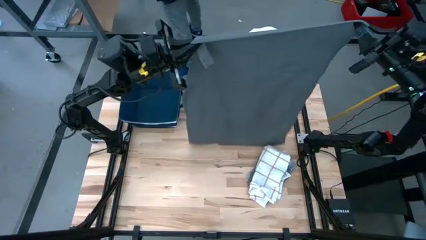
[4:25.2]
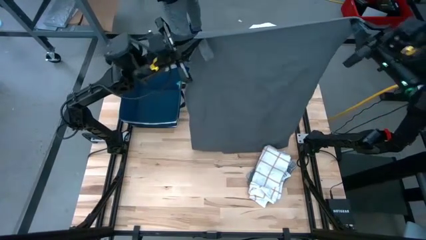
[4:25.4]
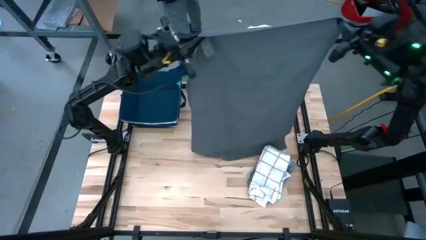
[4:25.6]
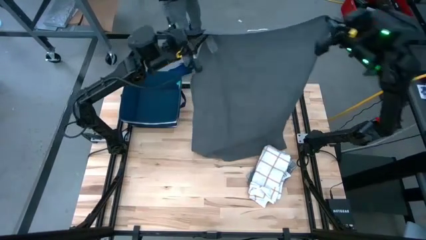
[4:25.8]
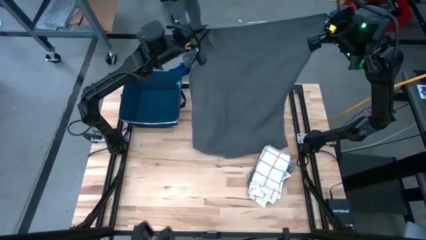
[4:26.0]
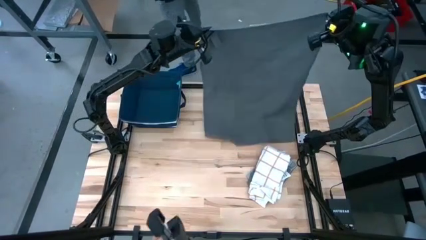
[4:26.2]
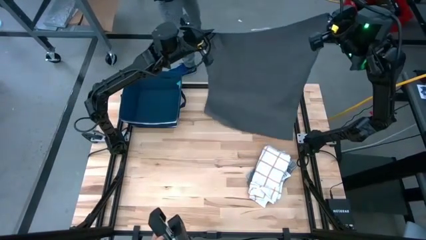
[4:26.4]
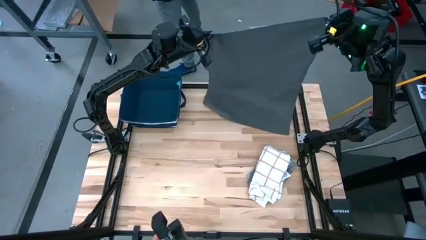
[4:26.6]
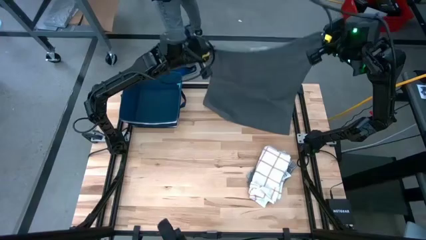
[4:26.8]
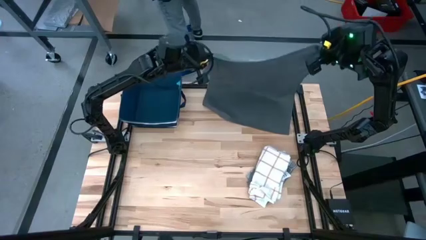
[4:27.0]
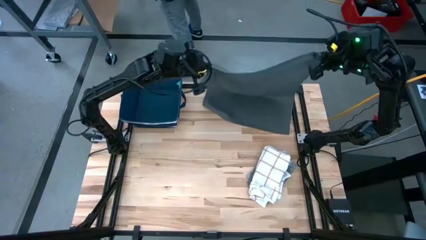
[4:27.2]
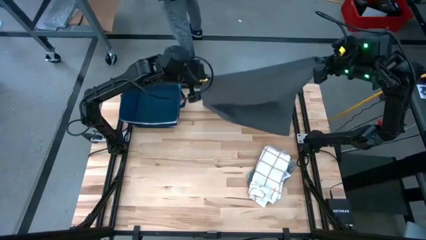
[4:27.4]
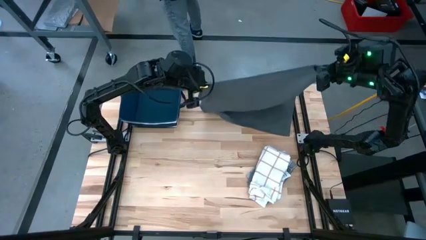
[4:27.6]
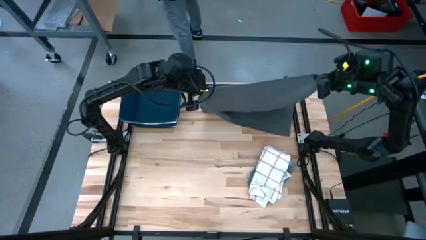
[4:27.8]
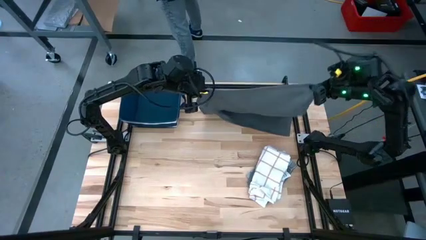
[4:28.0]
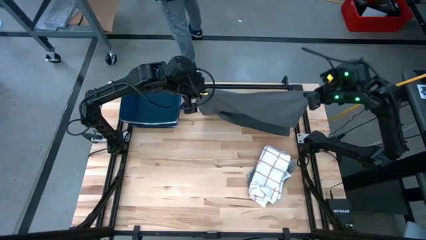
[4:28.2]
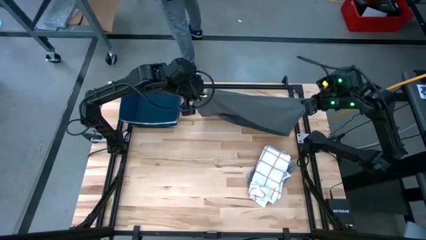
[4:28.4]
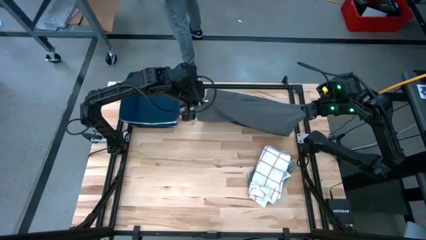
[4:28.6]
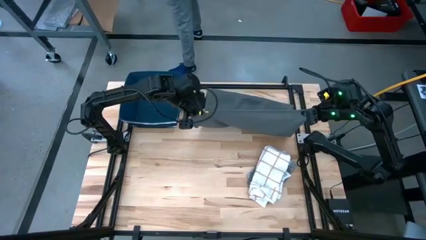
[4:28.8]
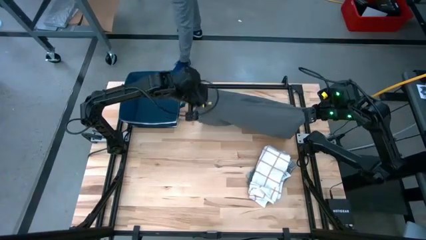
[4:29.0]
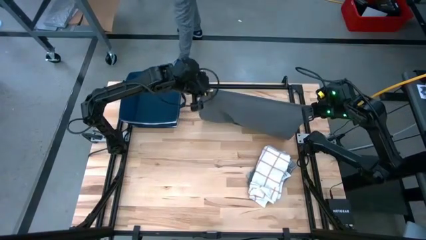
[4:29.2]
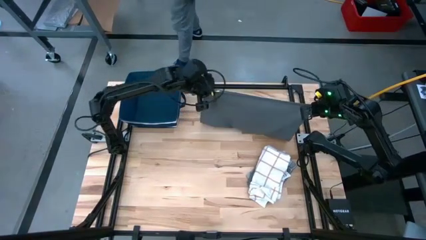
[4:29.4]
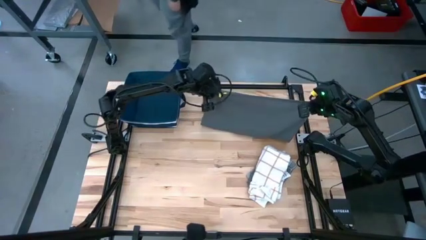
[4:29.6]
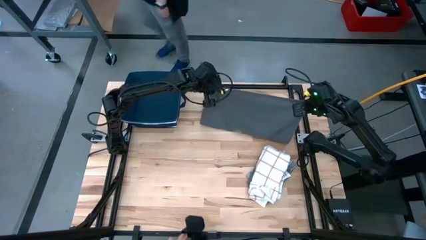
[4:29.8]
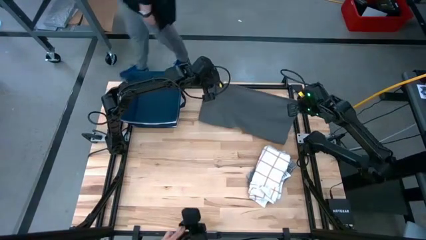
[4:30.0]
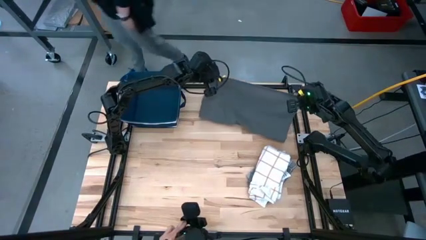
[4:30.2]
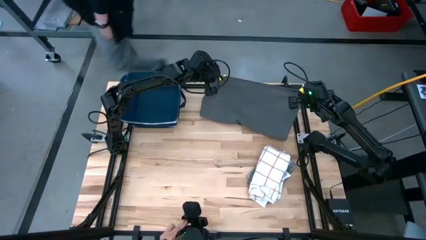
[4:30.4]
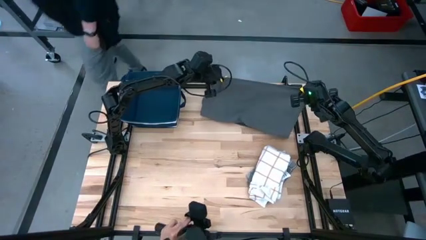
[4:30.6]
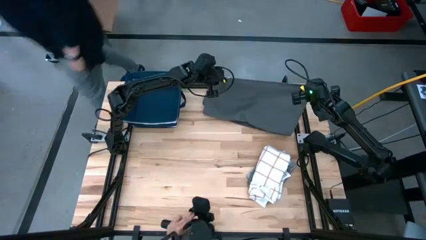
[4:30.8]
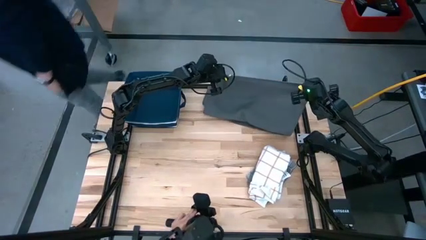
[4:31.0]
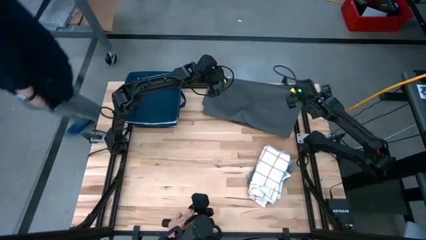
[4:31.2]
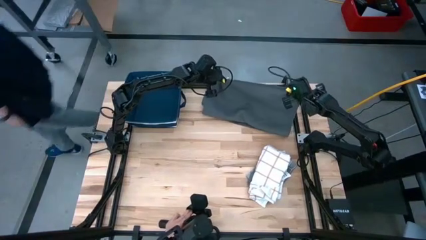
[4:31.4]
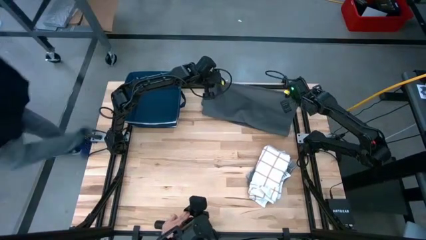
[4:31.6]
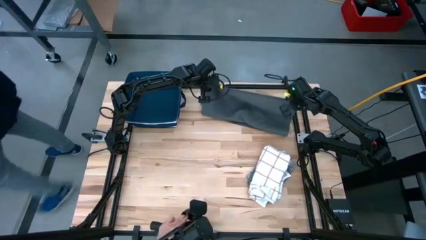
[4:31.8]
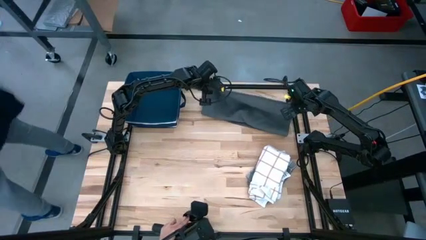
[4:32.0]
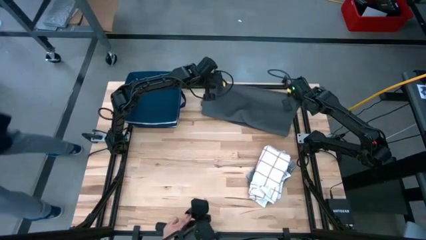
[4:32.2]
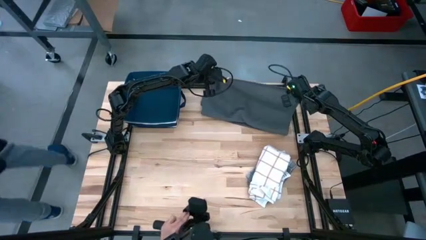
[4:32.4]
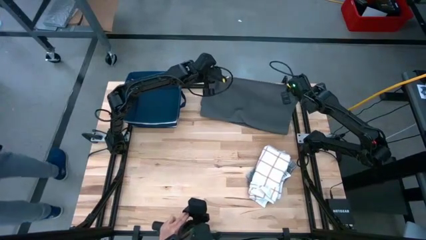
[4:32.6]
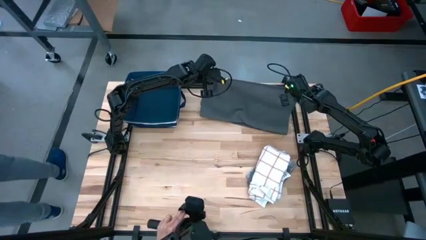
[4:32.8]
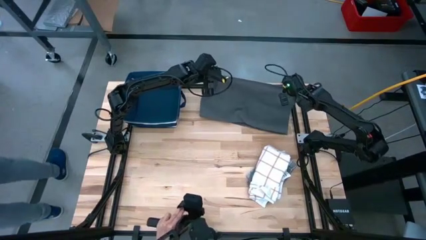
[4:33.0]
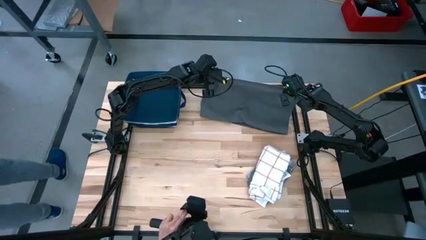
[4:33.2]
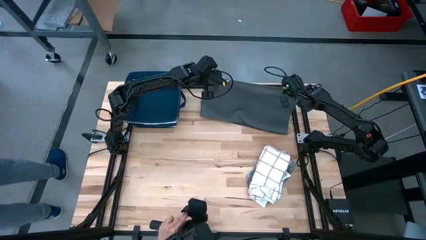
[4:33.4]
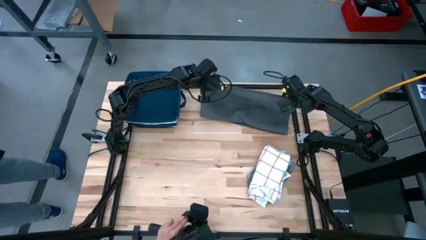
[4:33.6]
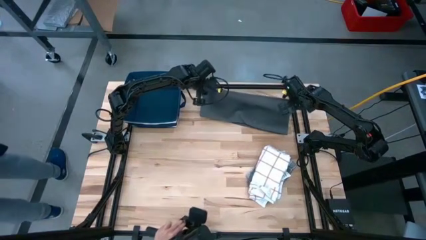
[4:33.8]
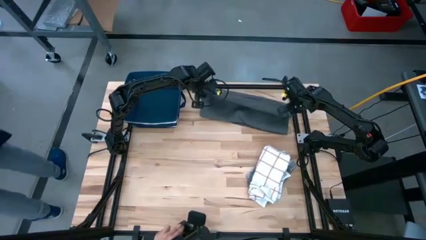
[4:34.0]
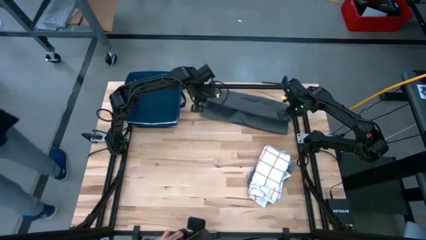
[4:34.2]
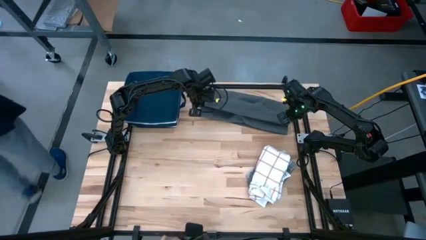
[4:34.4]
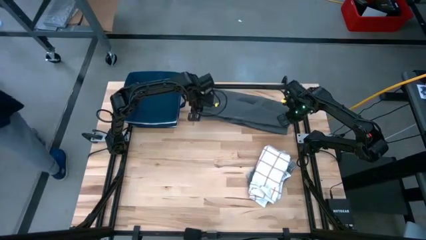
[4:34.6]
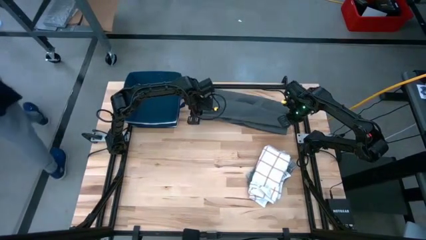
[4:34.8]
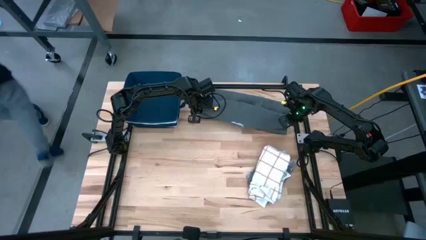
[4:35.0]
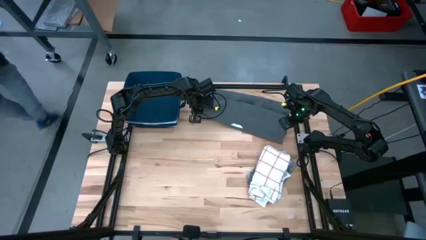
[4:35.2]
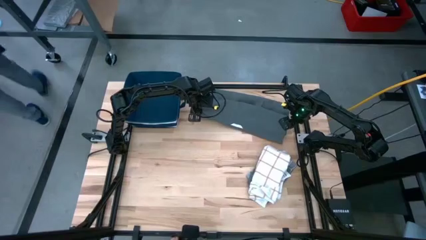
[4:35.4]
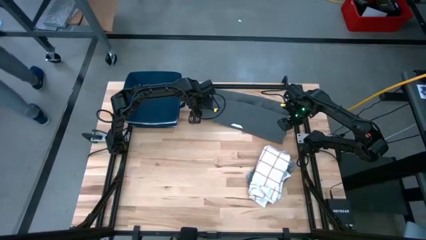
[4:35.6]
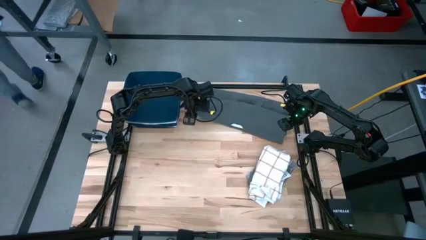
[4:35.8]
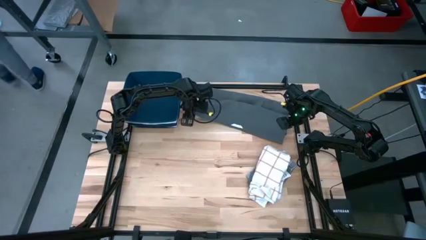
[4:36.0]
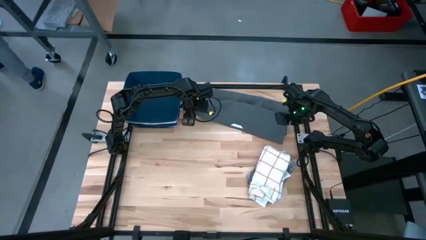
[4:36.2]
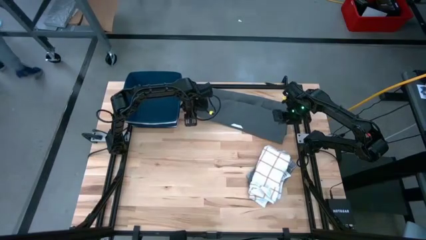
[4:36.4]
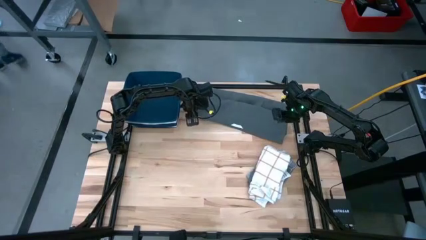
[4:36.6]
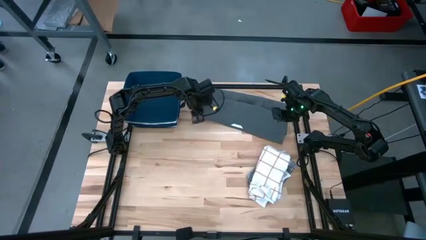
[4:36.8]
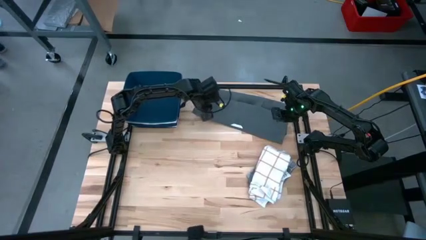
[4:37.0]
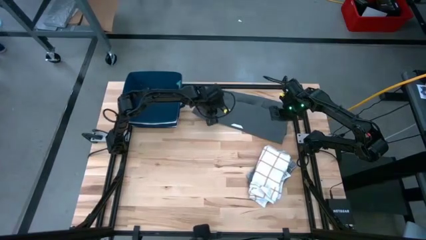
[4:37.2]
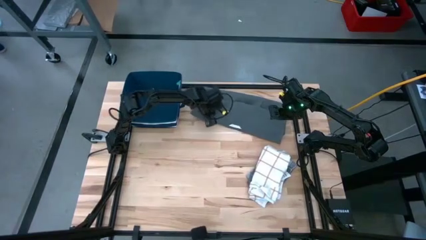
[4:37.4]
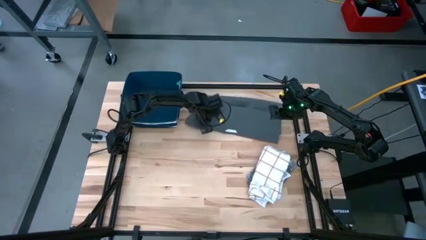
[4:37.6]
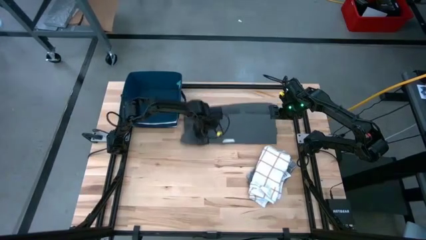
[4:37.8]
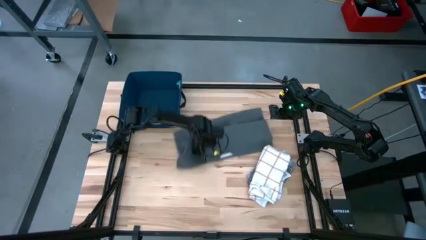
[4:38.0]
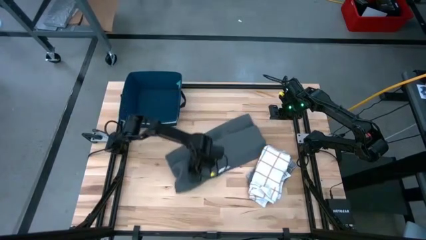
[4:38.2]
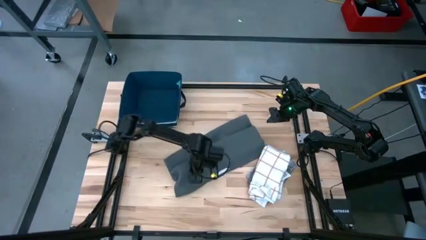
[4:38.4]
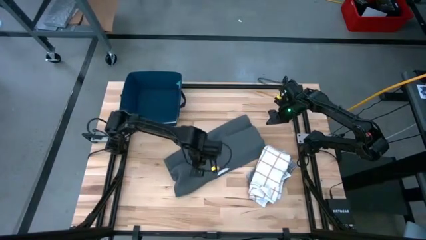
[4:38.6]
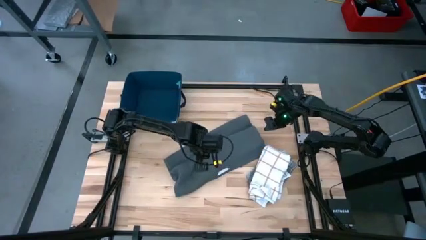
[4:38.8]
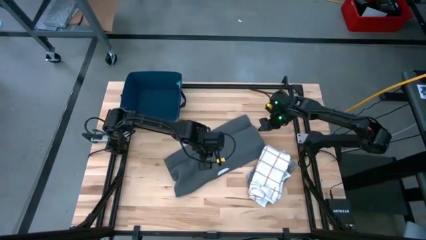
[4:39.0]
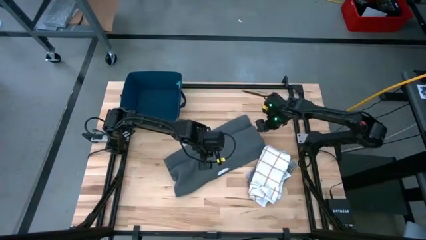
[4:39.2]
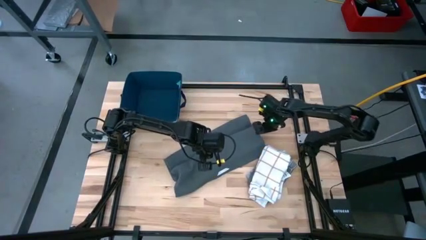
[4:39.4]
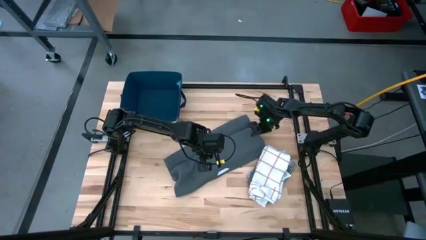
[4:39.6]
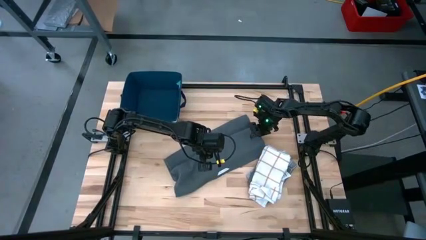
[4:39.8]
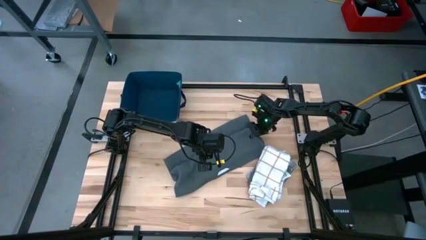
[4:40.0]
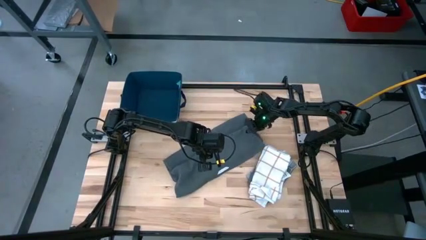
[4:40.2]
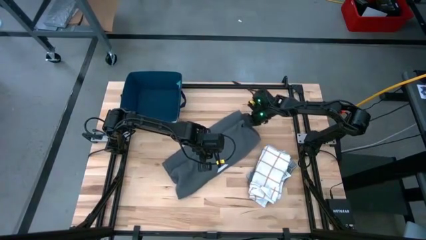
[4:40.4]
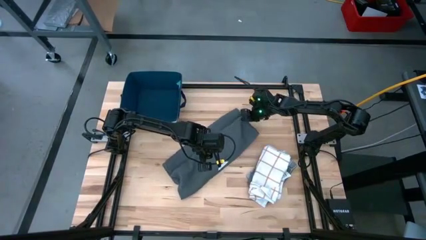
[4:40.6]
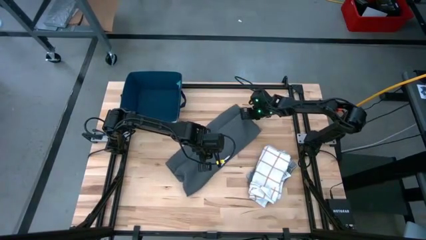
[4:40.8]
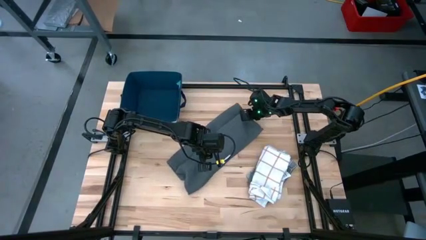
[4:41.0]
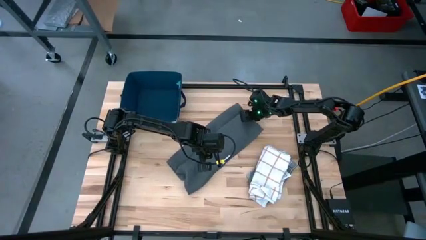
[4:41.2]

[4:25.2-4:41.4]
Task: Fold towel
Fold the gray towel
